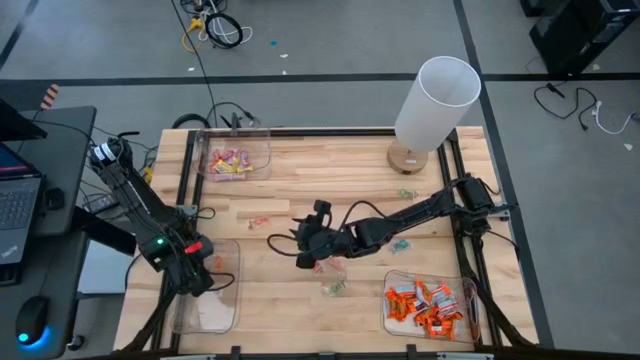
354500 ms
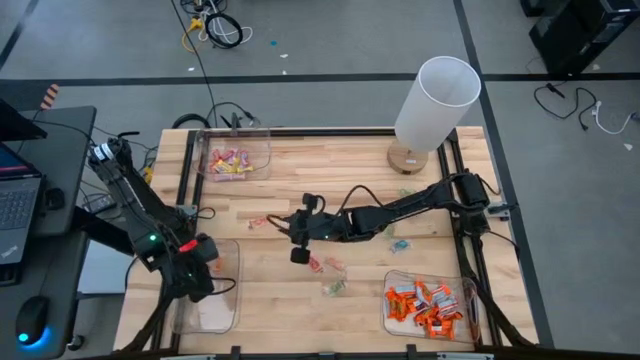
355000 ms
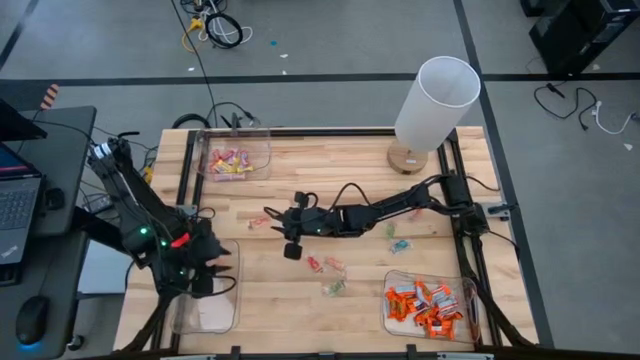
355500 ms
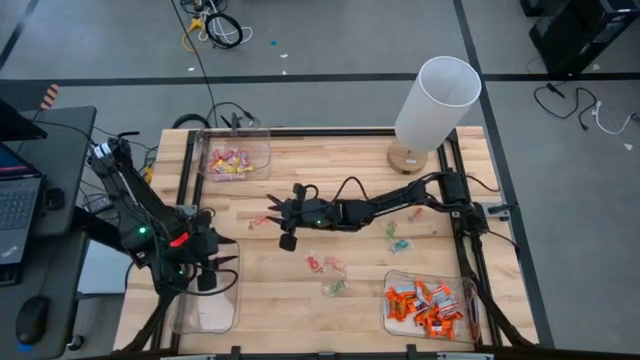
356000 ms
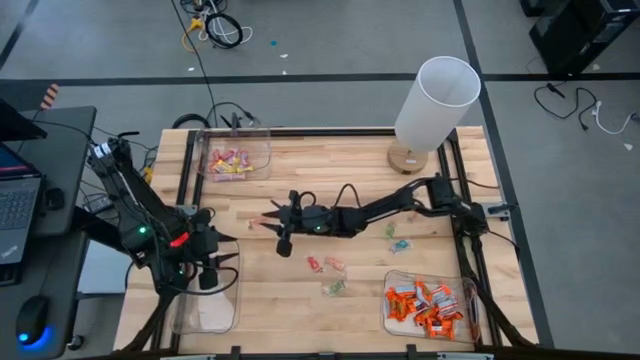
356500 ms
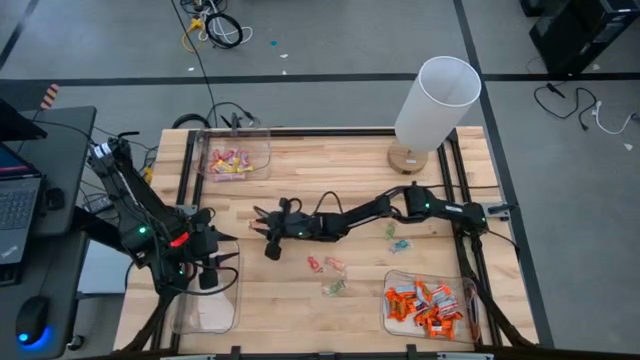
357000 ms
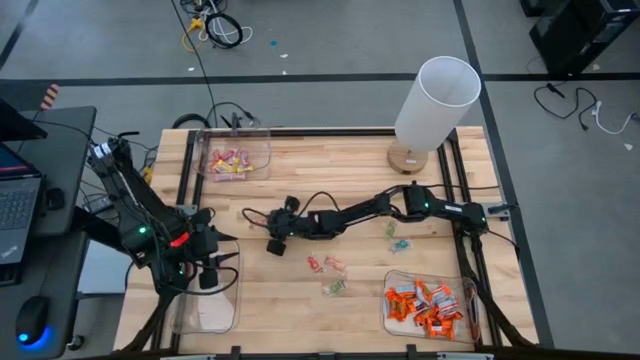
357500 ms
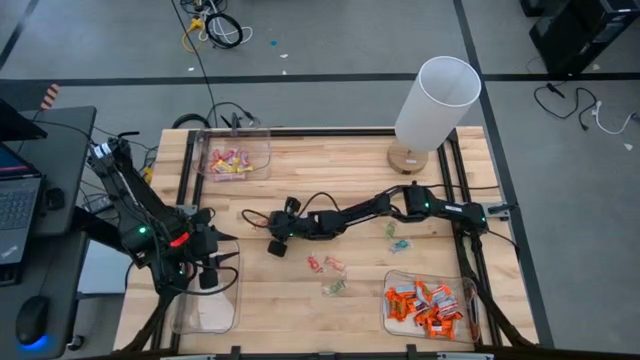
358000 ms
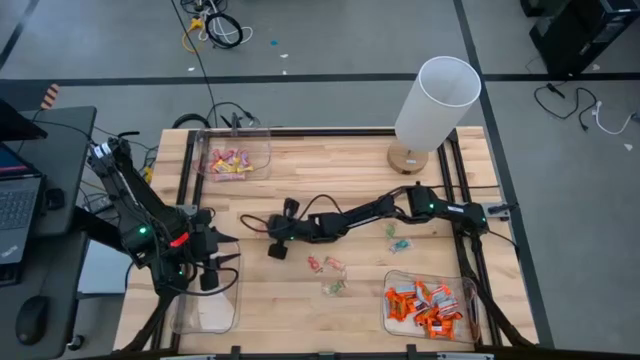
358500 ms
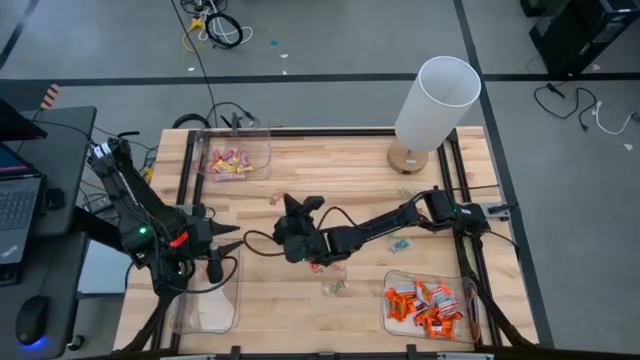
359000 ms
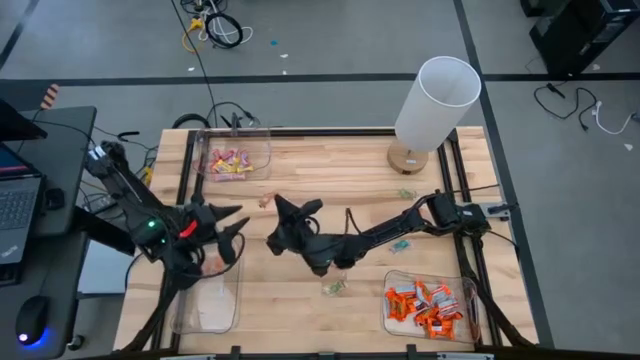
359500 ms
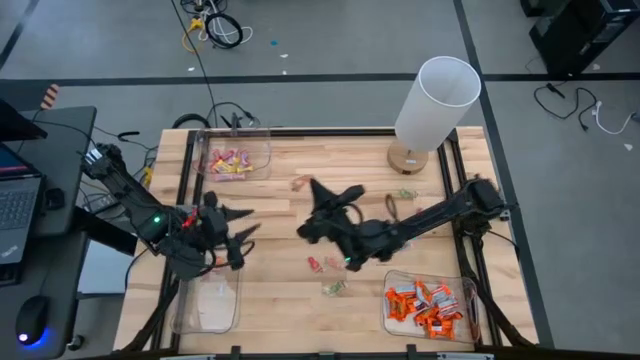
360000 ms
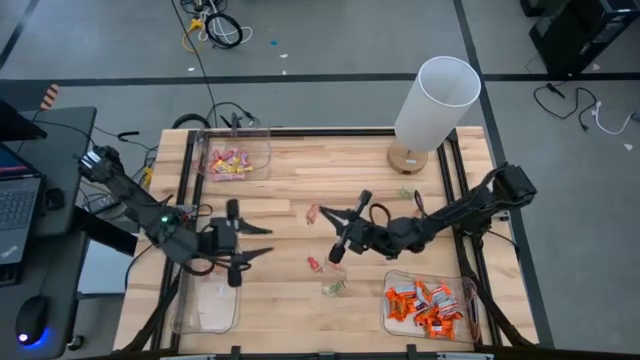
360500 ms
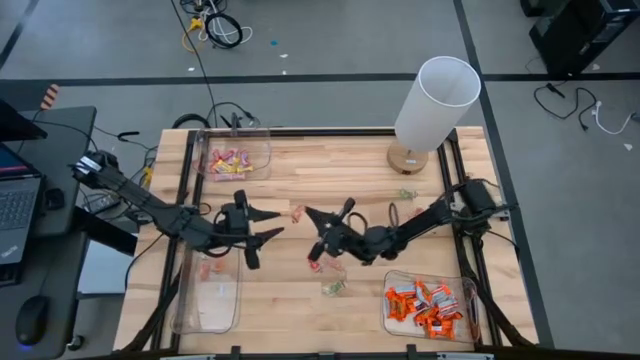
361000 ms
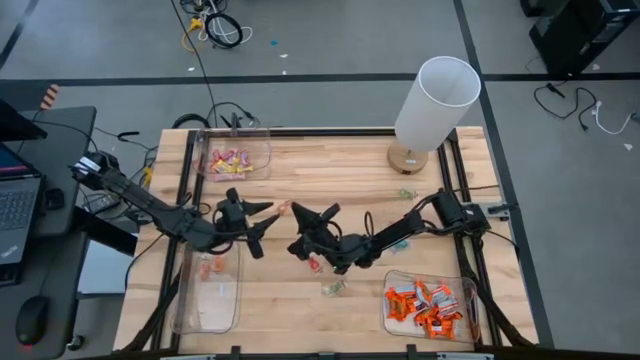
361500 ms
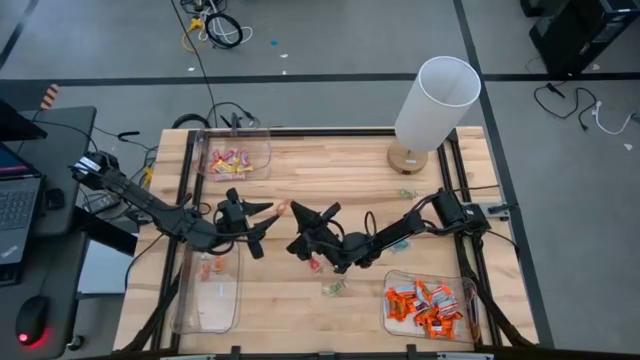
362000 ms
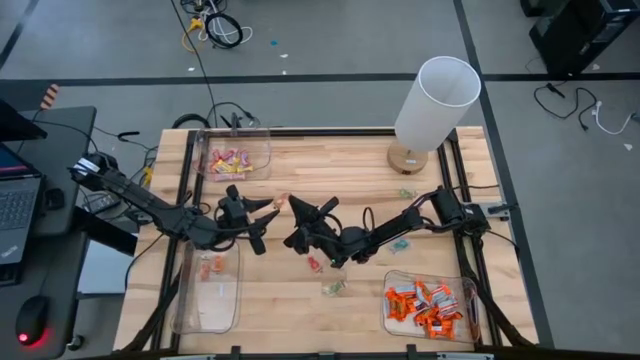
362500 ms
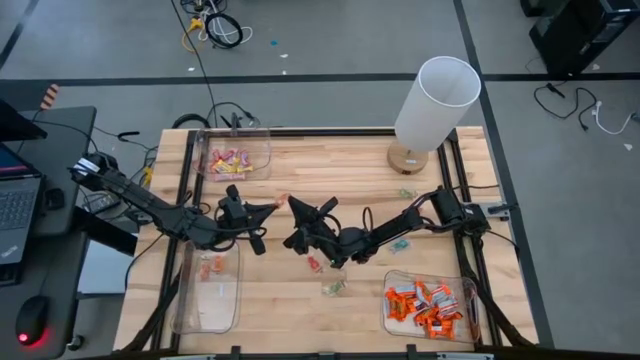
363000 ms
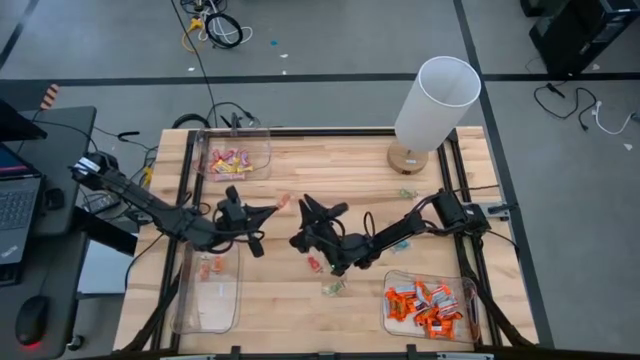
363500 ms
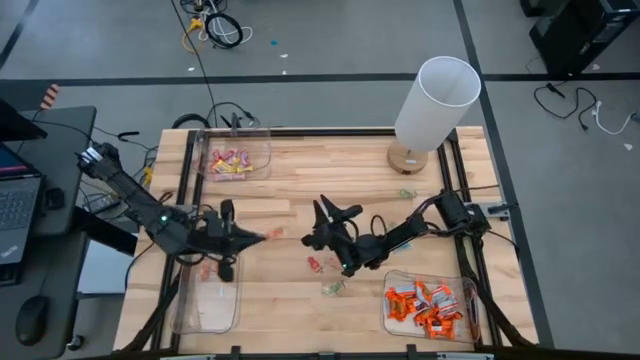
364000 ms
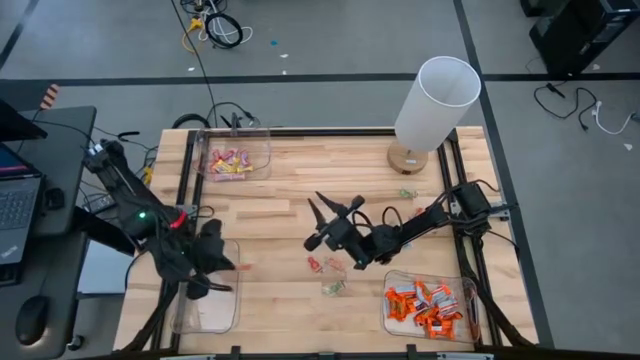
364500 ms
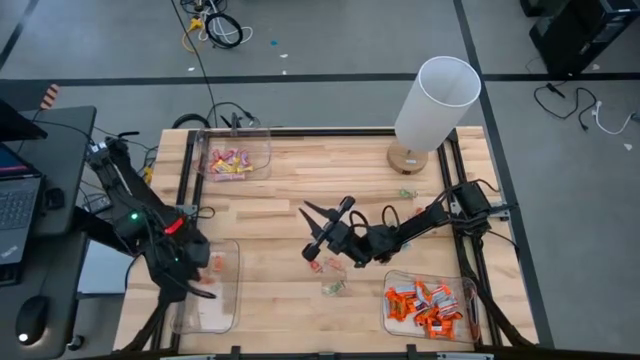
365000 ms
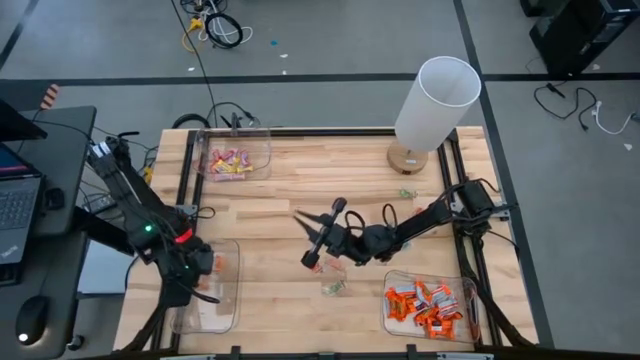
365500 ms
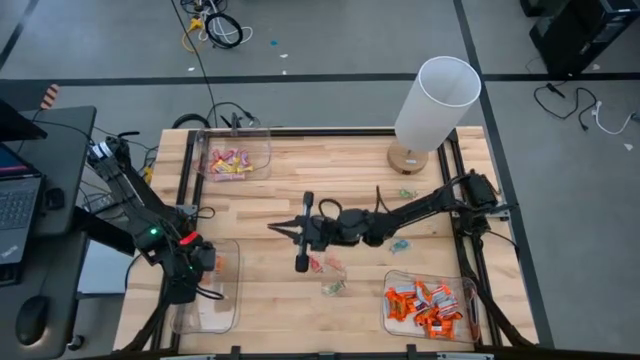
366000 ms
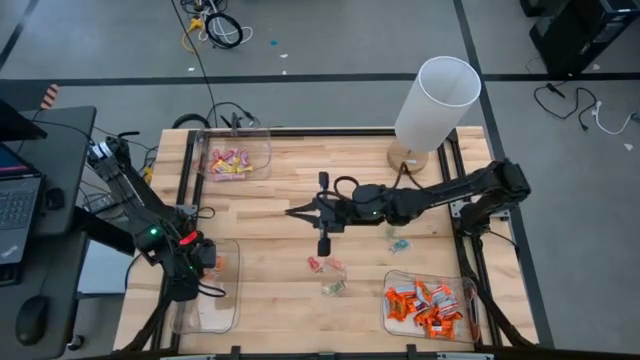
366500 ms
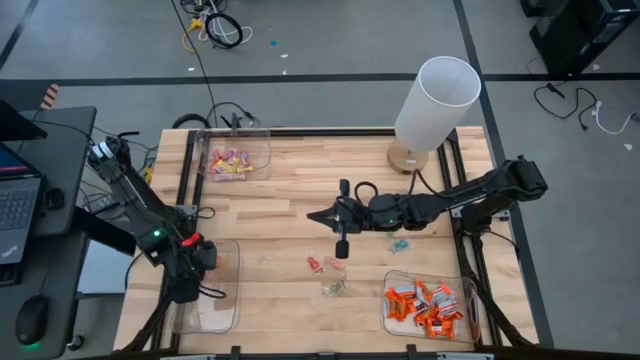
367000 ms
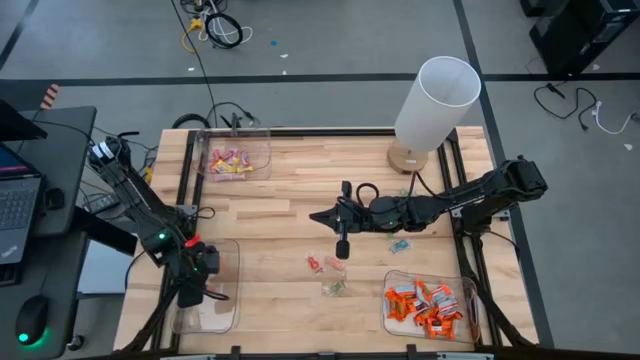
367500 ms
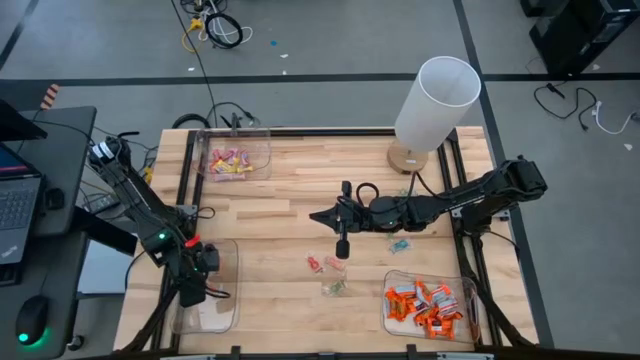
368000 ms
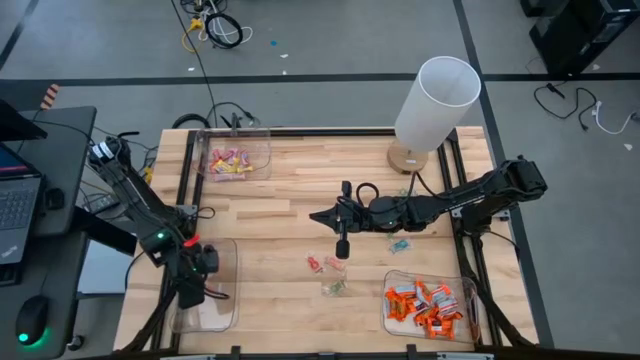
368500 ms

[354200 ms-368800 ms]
Task: Sort candy
Put the orange gummy into the bottom left transparent bin

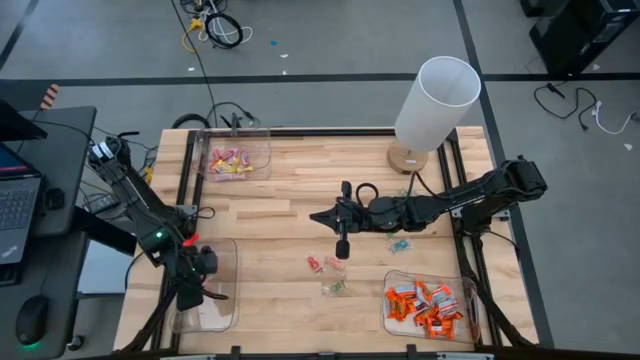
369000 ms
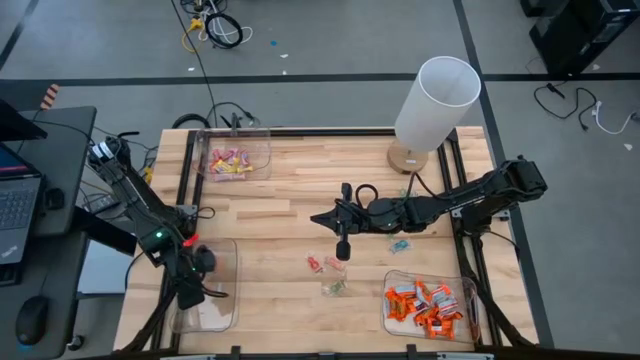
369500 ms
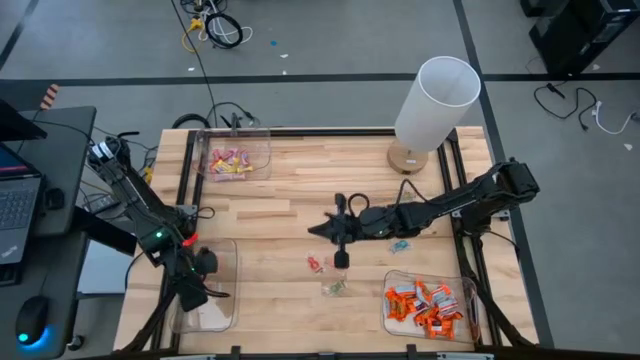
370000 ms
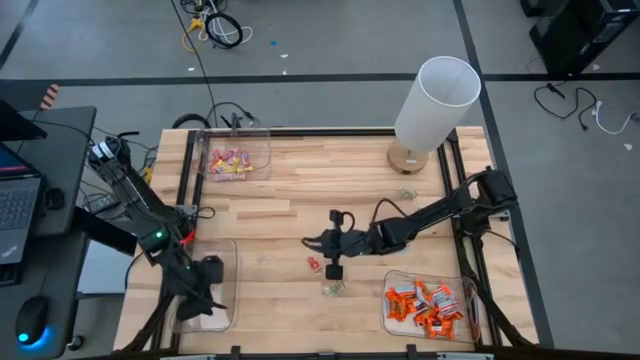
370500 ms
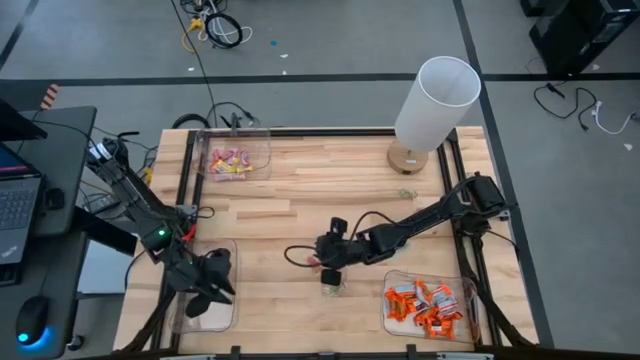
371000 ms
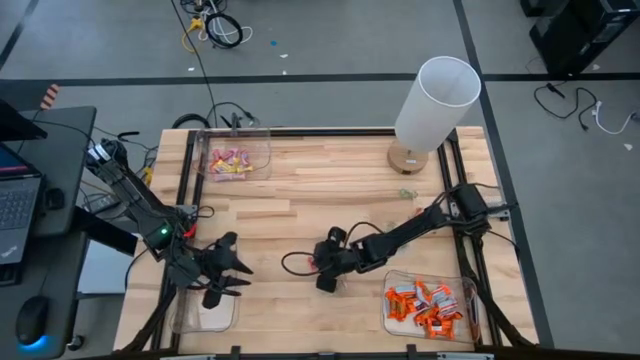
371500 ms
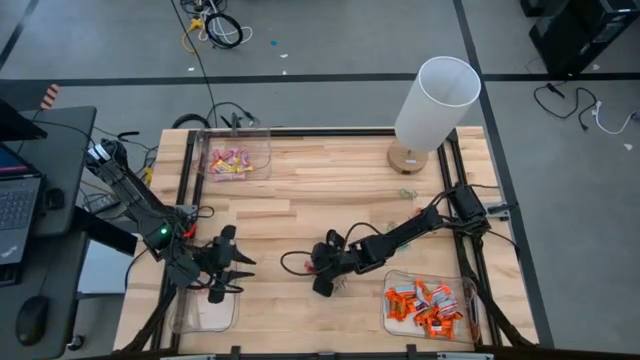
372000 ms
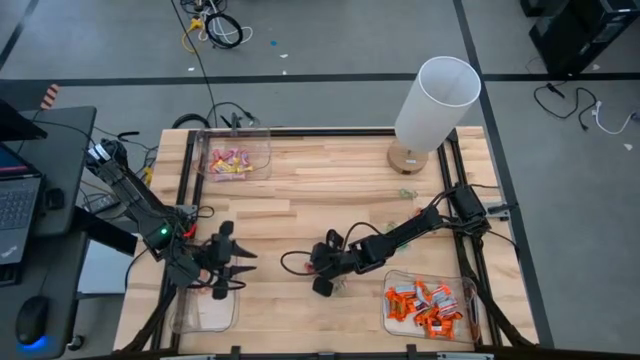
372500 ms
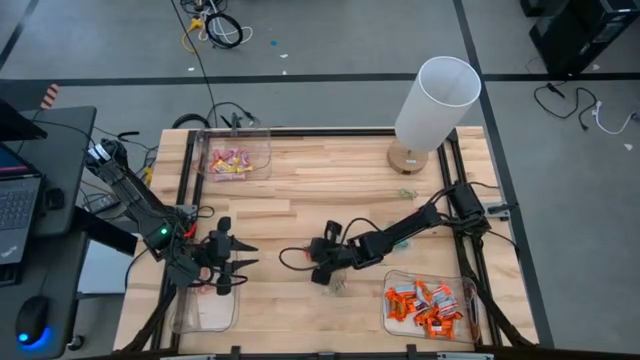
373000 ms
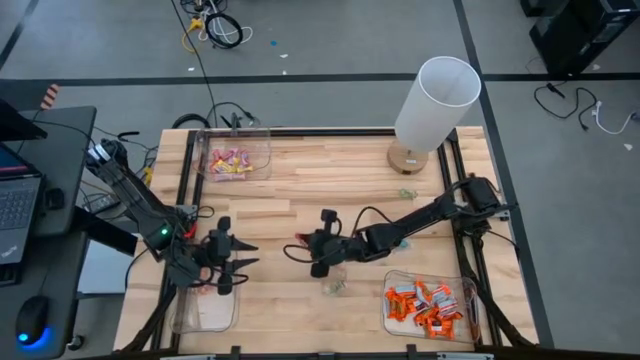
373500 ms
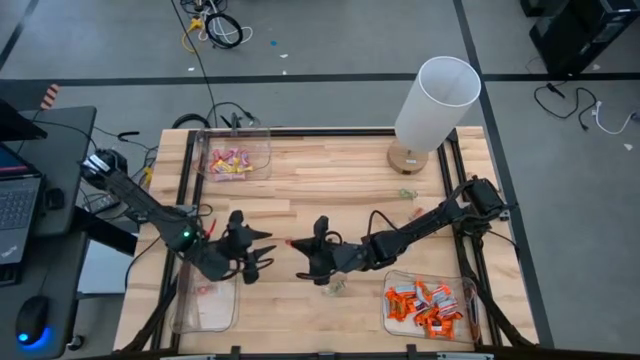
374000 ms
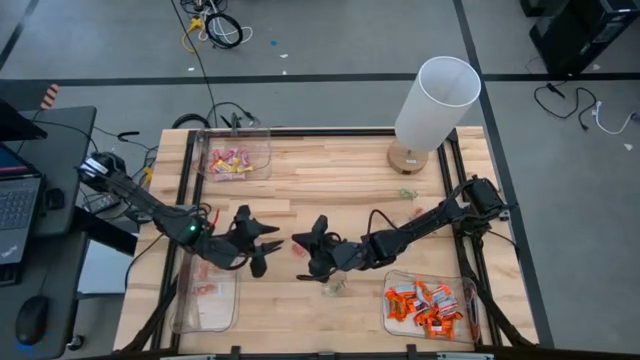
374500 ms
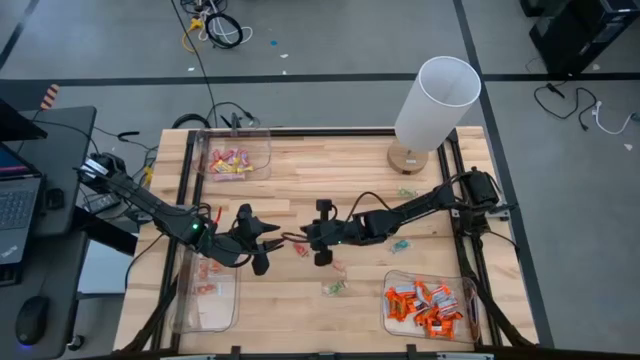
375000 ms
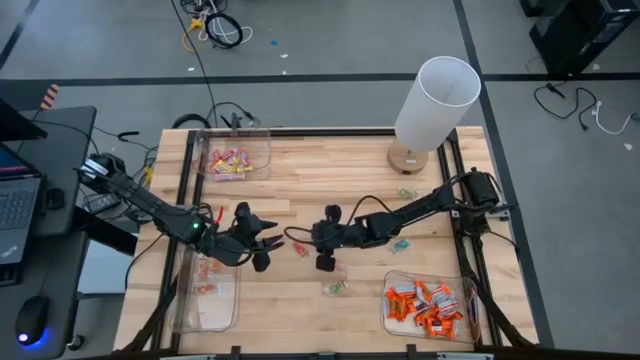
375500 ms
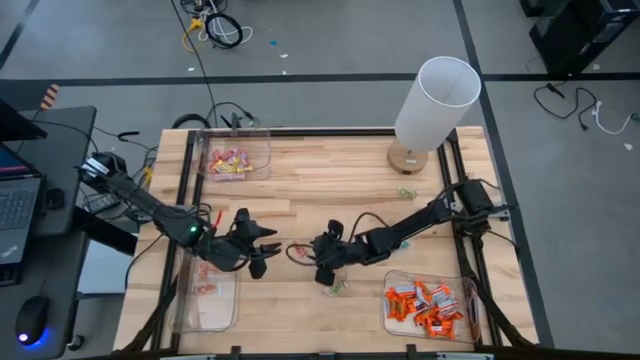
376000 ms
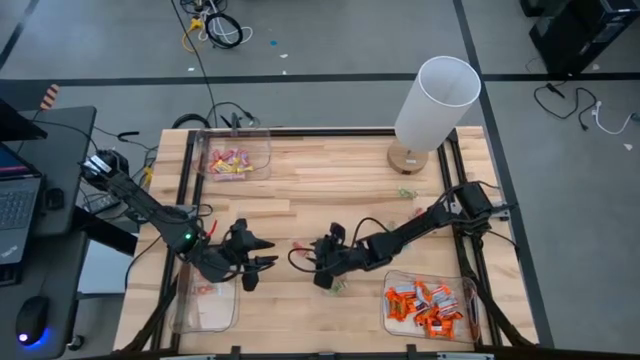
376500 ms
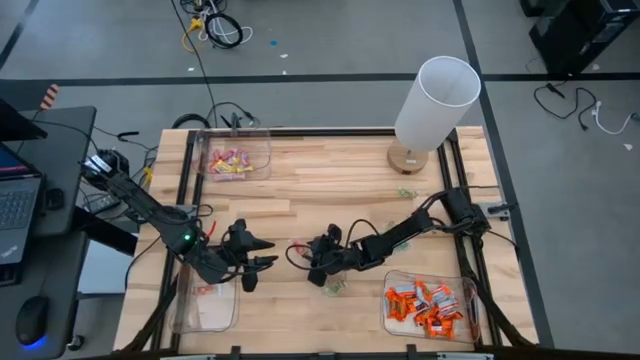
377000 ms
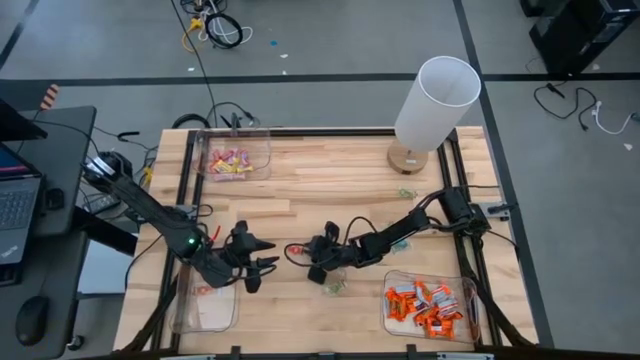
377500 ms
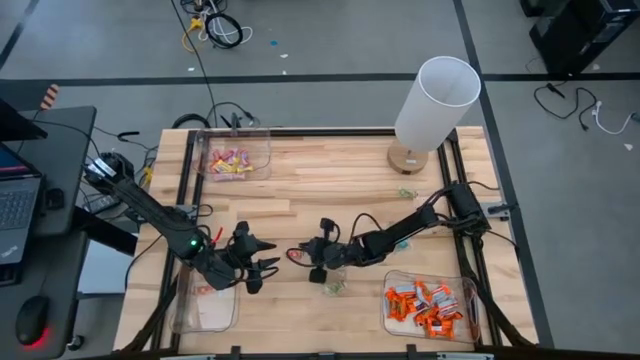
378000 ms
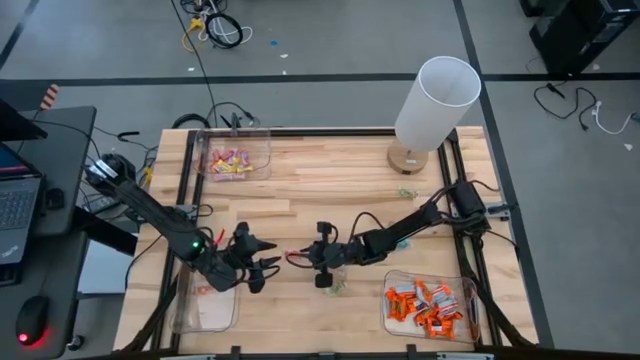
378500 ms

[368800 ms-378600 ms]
Put the orange gummy into the bottom left transparent bin
